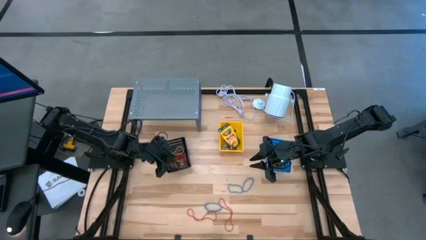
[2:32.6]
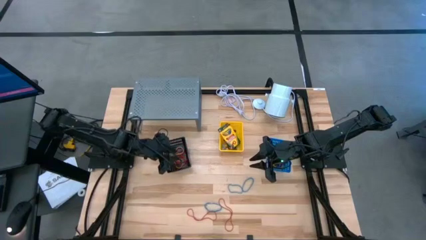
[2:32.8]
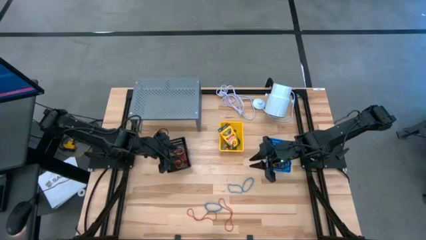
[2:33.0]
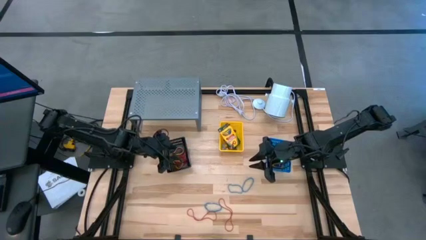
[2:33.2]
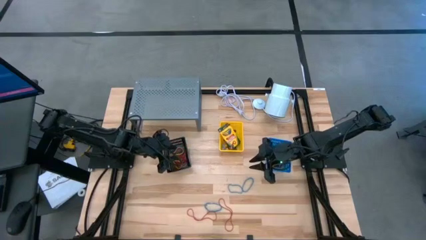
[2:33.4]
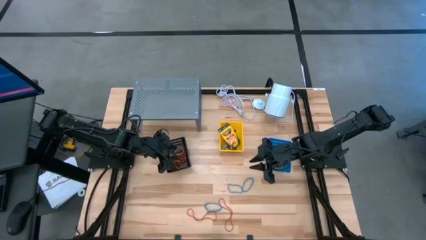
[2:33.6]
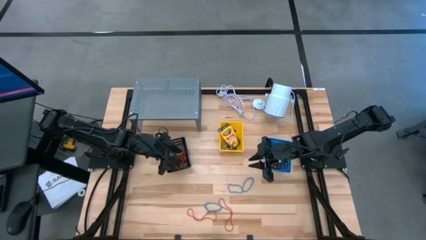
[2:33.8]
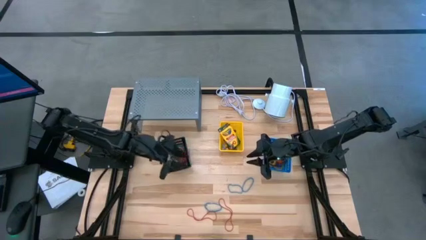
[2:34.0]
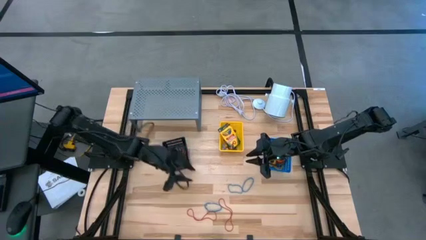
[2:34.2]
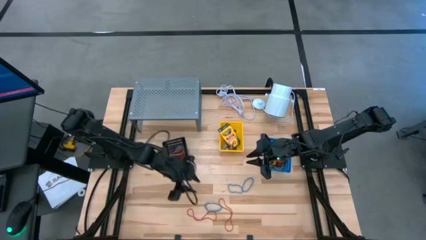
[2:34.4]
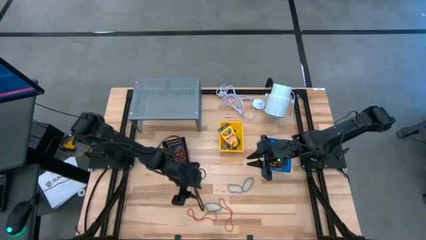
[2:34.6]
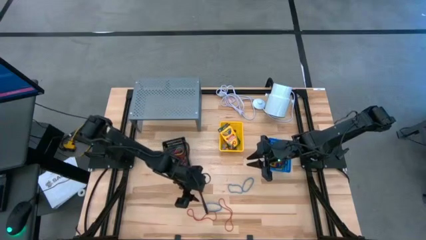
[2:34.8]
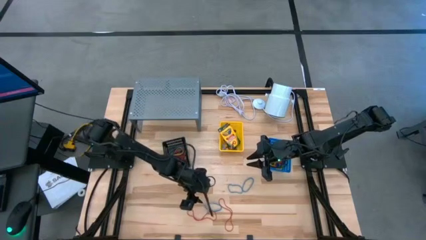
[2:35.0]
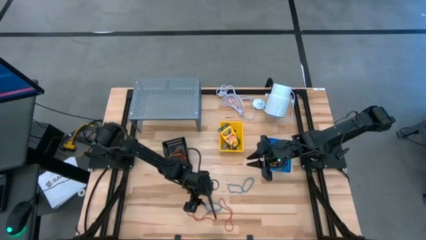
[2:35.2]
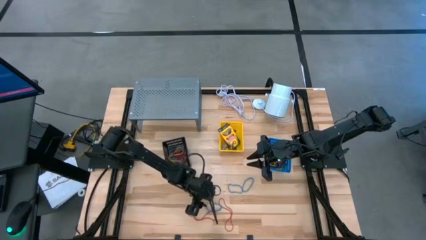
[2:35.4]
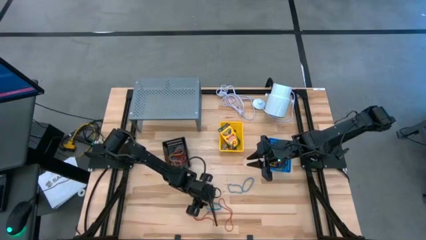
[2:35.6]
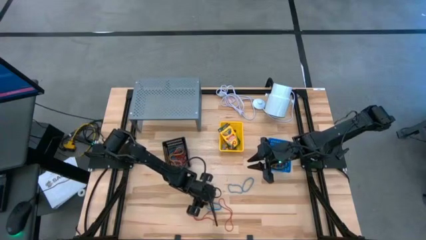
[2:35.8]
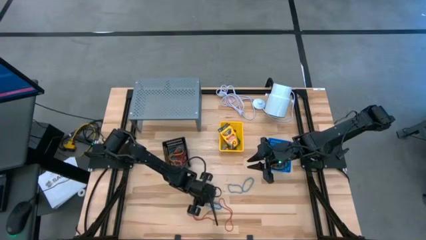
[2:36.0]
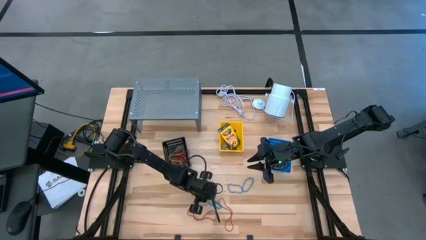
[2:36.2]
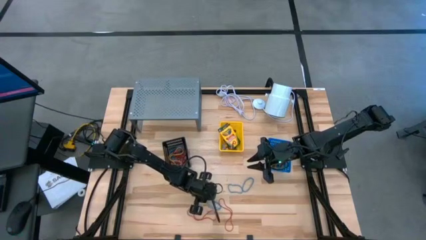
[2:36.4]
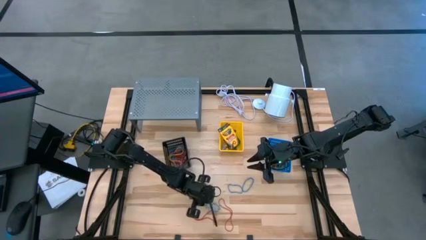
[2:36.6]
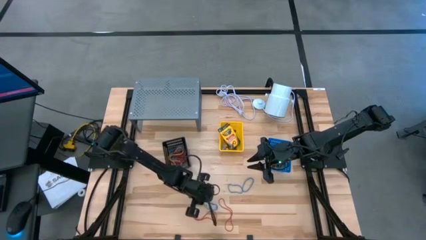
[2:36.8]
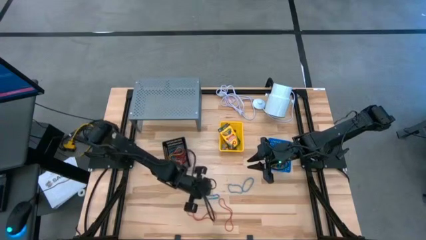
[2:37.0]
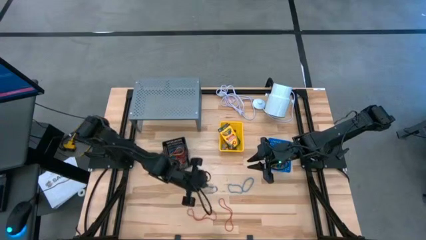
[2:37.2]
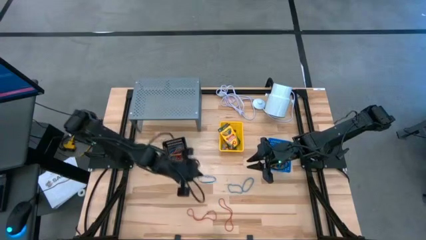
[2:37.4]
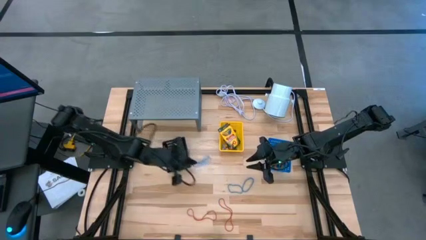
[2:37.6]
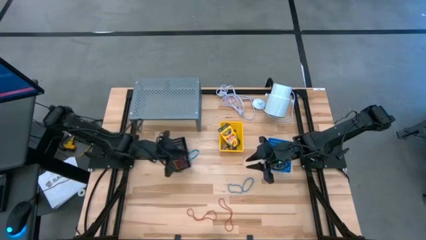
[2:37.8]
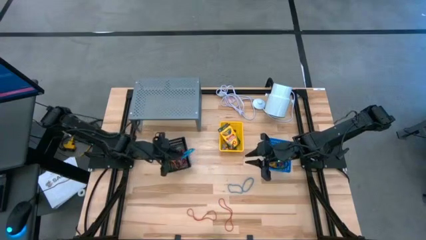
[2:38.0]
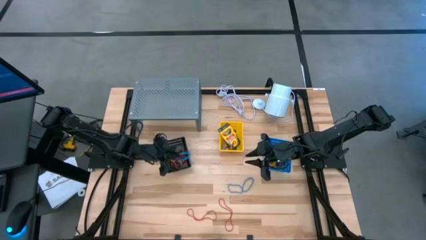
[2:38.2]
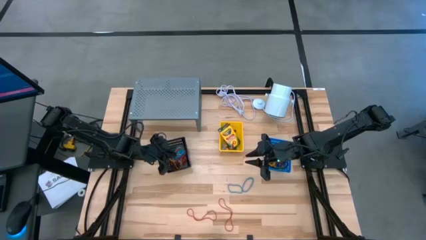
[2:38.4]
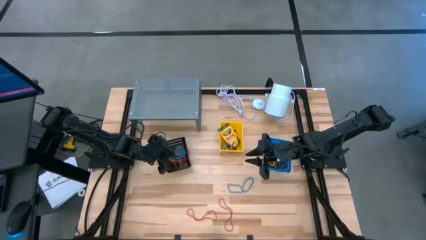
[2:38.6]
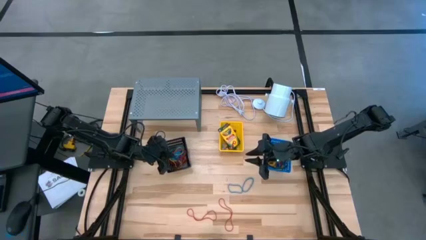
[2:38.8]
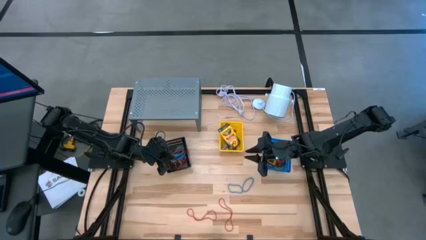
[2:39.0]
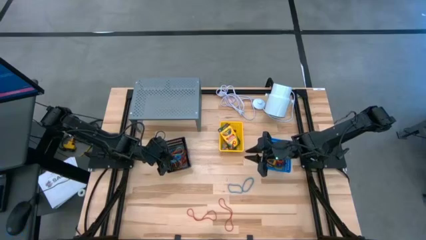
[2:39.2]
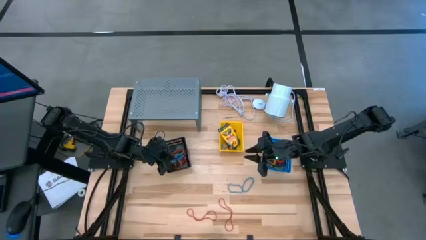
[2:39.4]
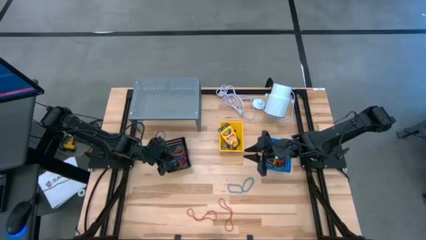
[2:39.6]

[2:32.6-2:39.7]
Task: Pick & Place Office Desk Supplies
Put the blue rubber band into the black bin

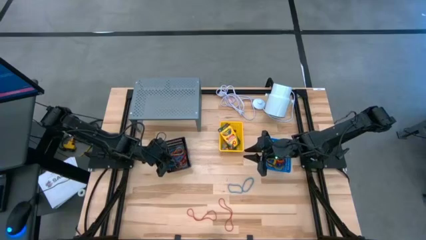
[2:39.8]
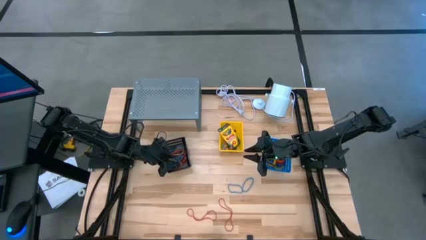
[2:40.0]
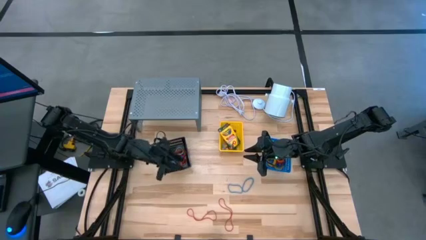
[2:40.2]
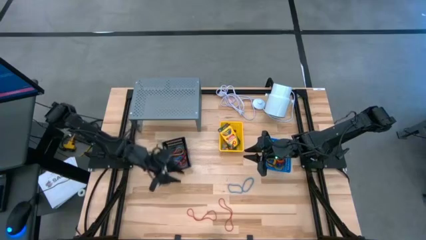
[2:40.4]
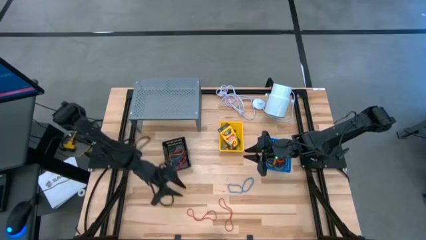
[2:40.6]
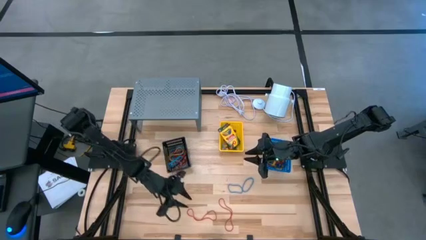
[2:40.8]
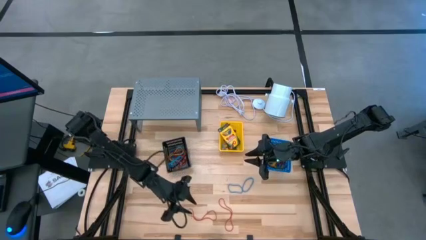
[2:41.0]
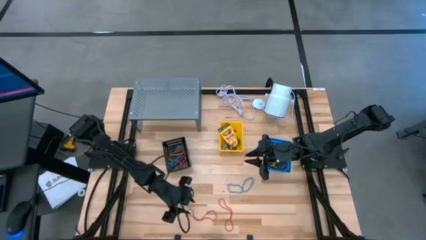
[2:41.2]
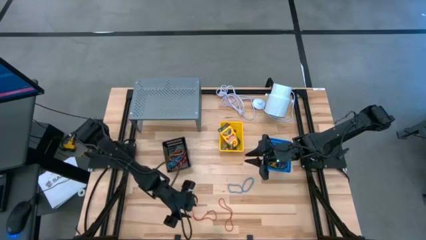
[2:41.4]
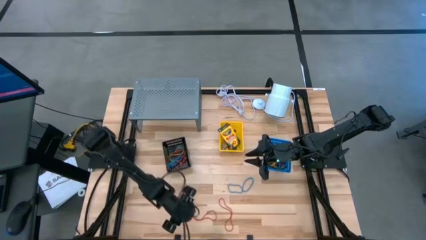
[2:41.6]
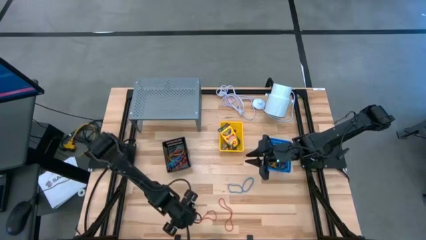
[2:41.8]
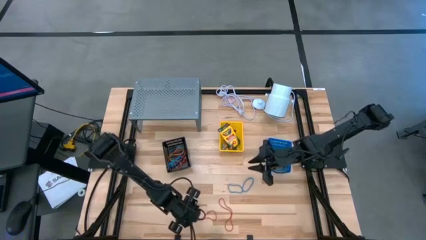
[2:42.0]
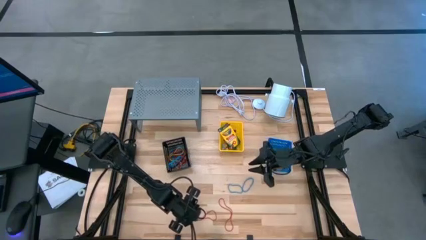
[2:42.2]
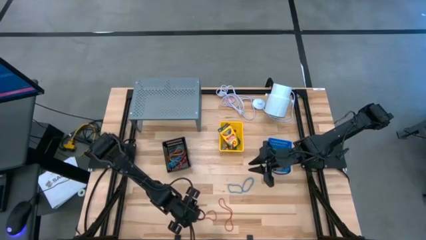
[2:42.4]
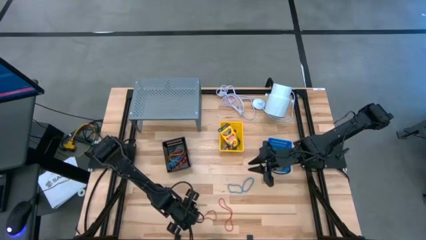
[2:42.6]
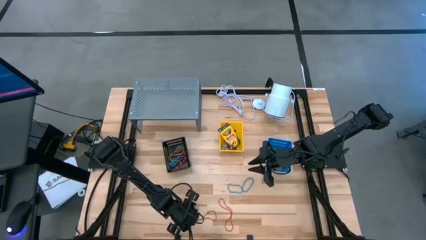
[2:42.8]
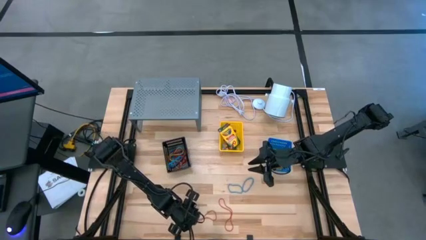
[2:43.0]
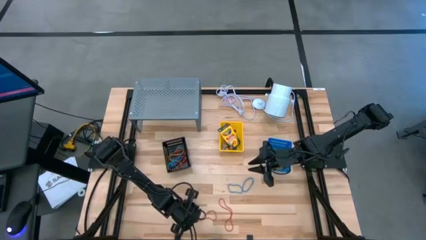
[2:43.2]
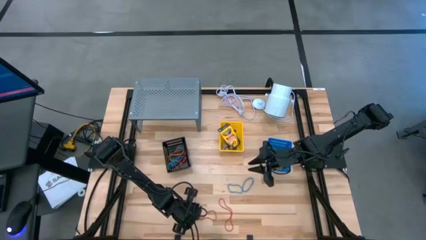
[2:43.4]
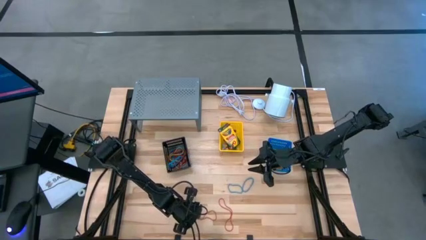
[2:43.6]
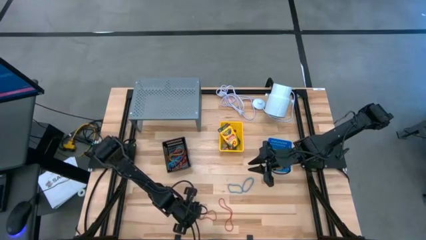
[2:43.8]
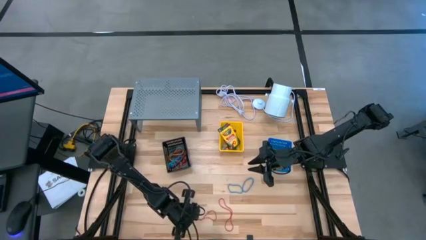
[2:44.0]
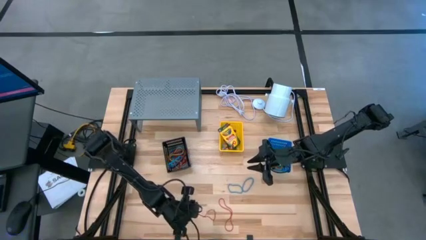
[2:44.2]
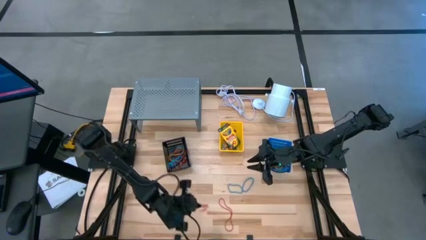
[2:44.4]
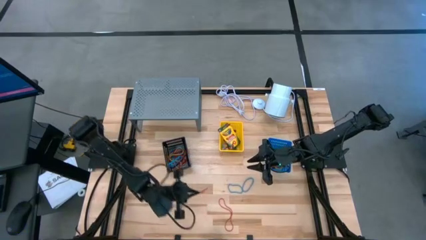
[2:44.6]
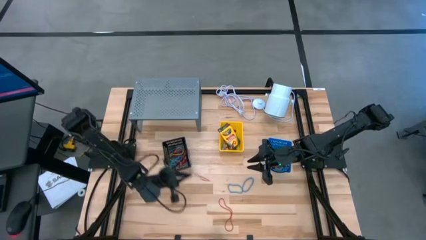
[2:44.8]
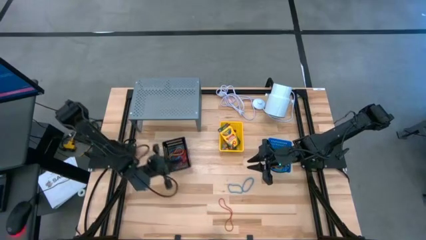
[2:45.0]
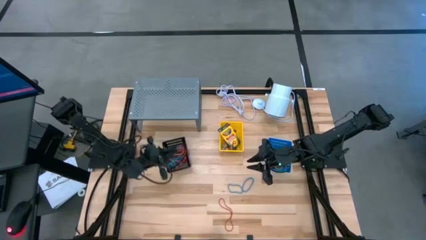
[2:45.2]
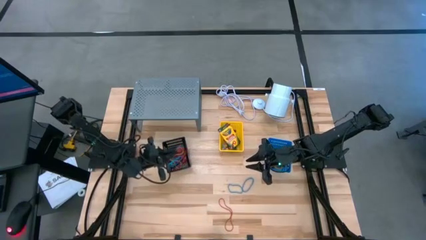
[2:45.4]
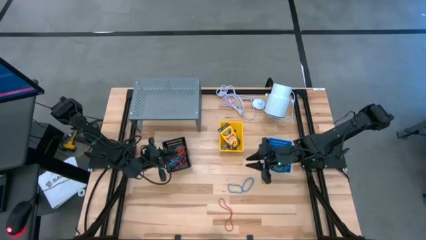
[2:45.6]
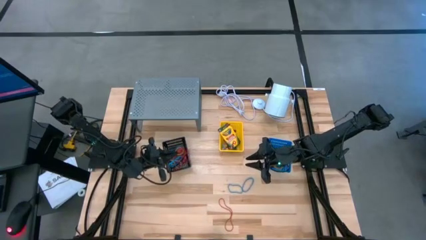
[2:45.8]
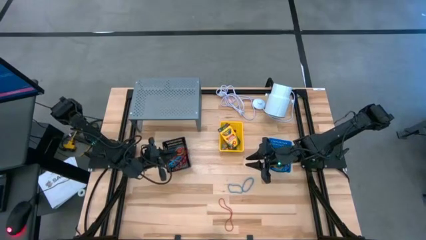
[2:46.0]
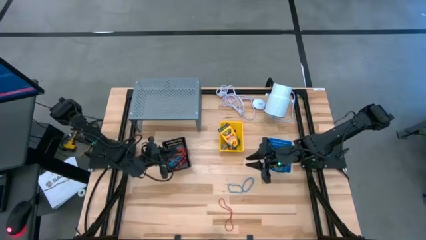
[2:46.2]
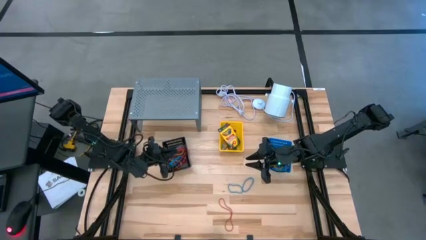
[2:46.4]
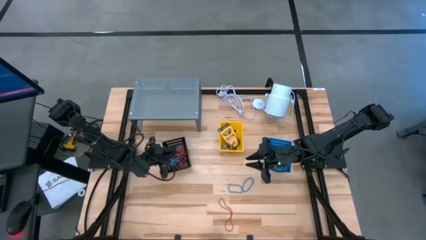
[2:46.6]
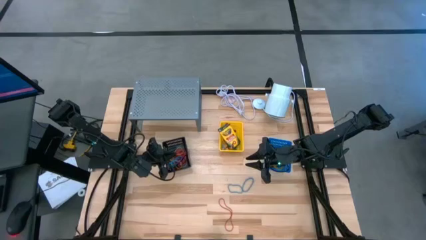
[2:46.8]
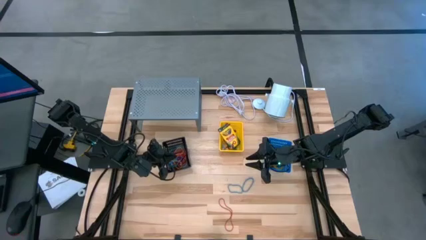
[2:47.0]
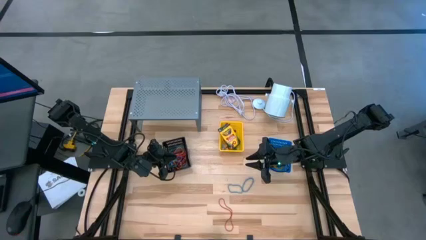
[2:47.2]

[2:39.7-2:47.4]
Put the red rubber band into the black bin
